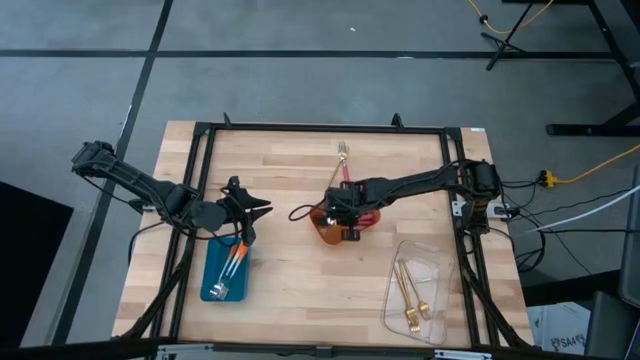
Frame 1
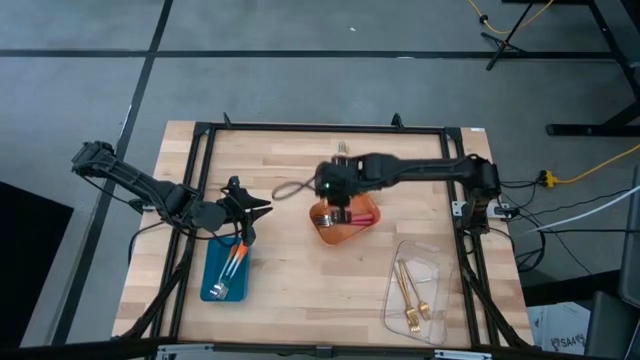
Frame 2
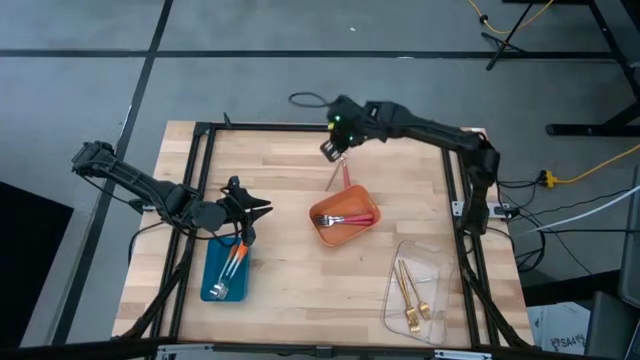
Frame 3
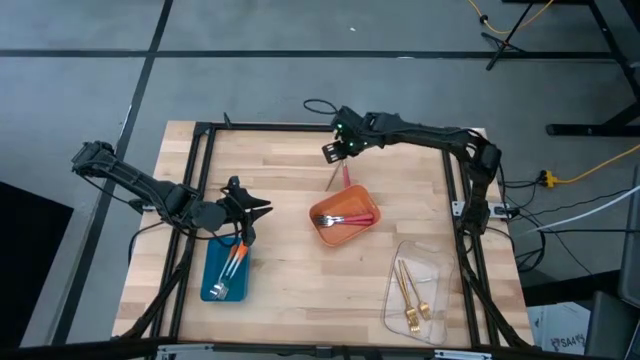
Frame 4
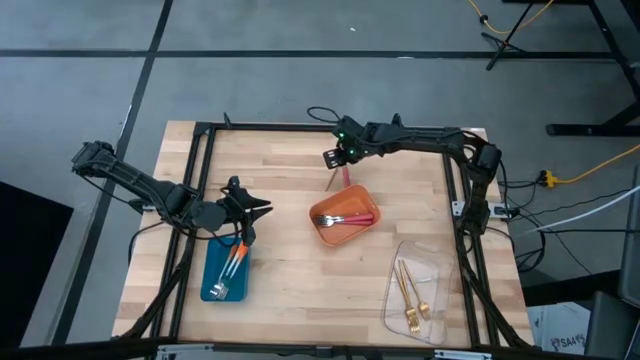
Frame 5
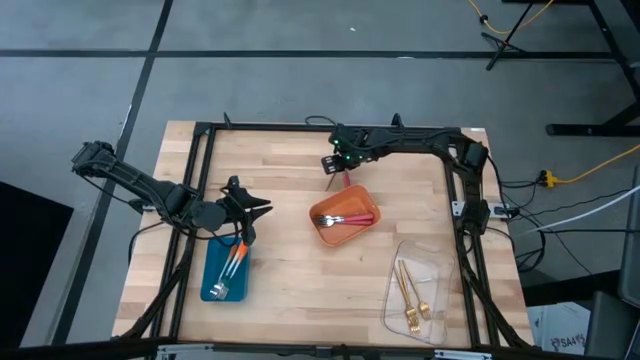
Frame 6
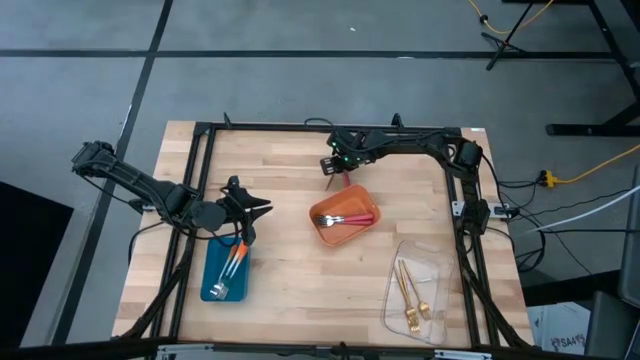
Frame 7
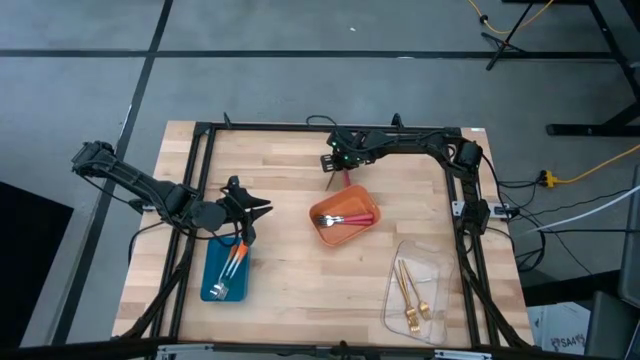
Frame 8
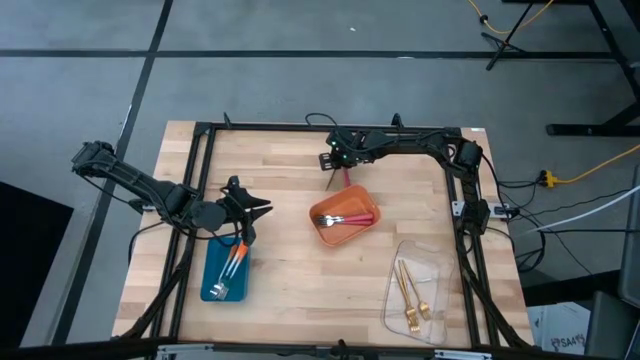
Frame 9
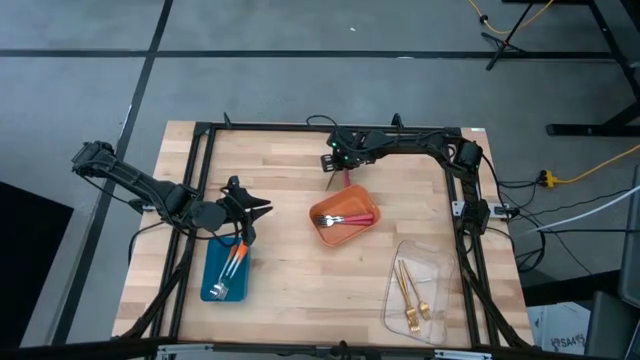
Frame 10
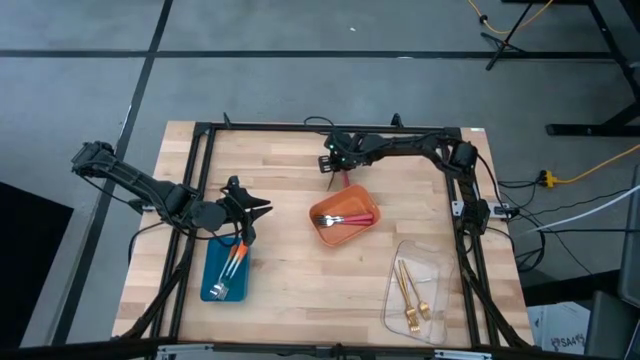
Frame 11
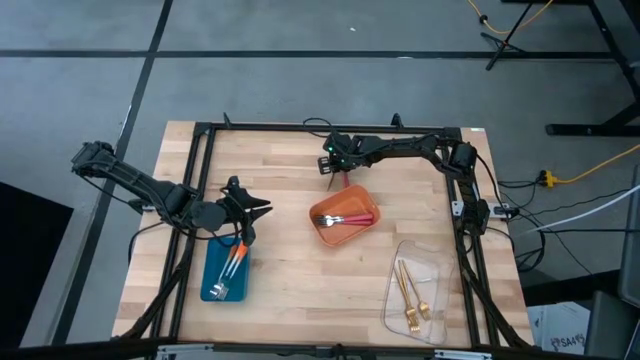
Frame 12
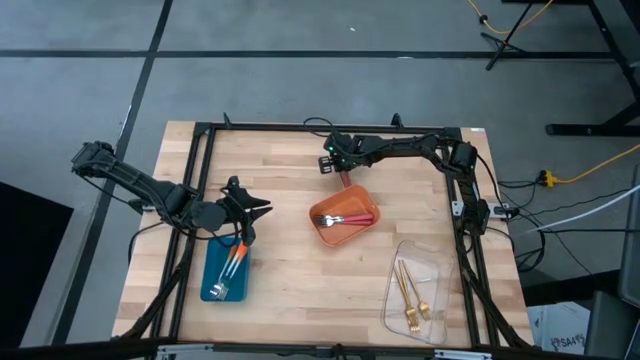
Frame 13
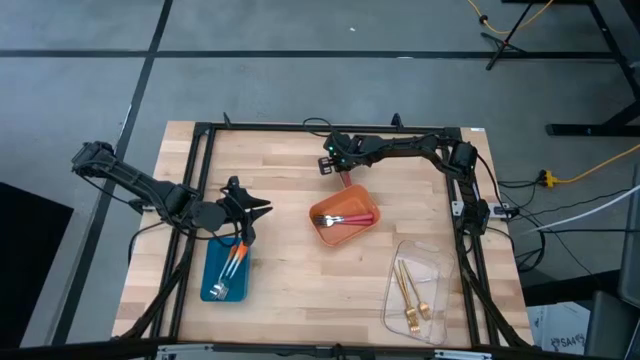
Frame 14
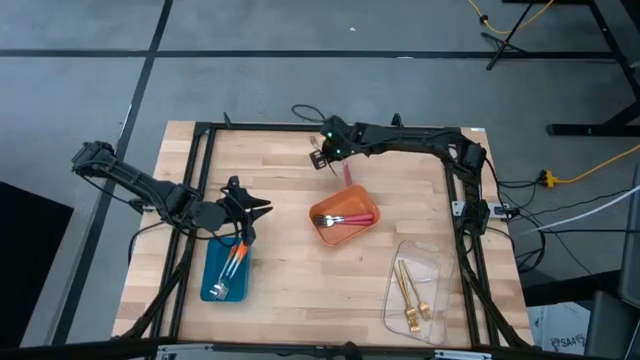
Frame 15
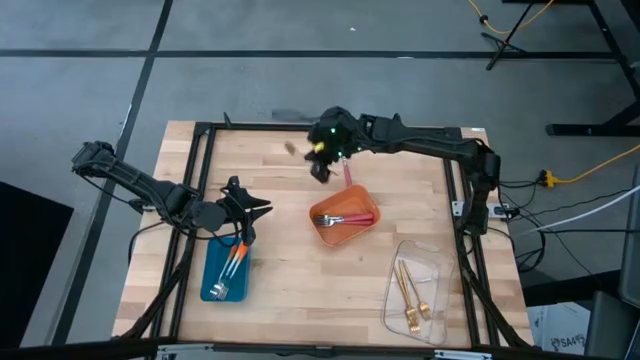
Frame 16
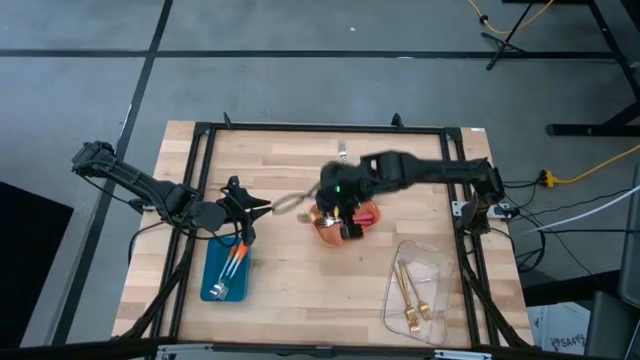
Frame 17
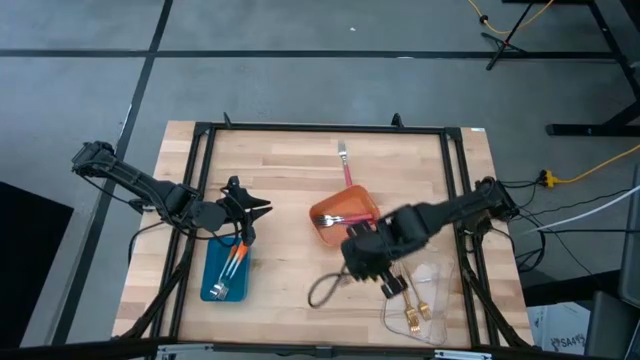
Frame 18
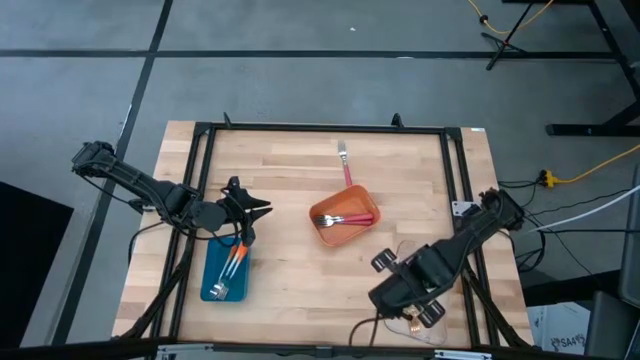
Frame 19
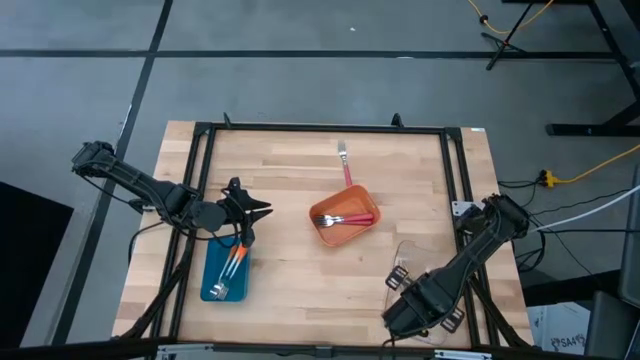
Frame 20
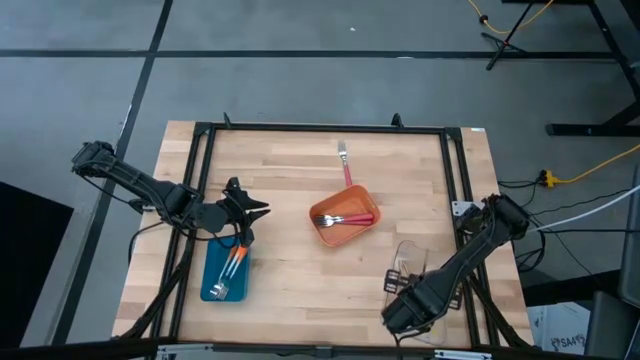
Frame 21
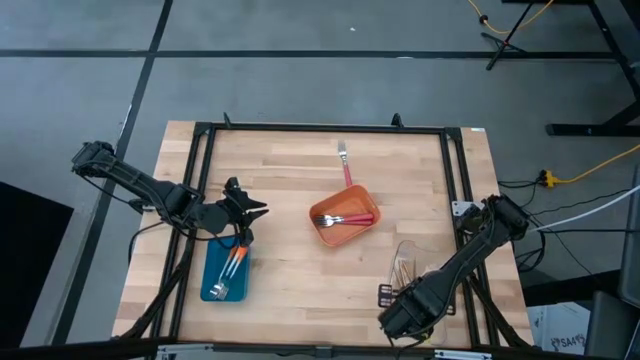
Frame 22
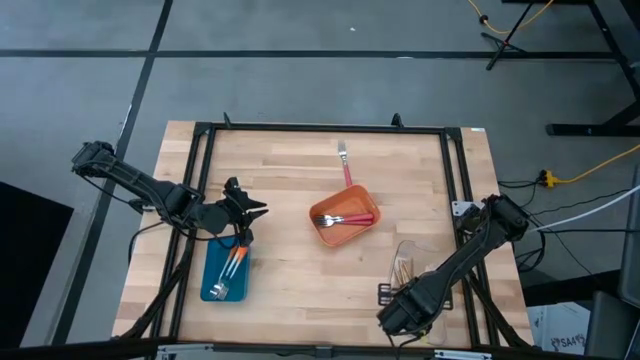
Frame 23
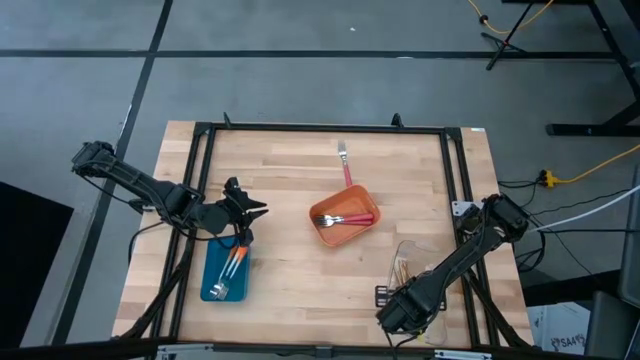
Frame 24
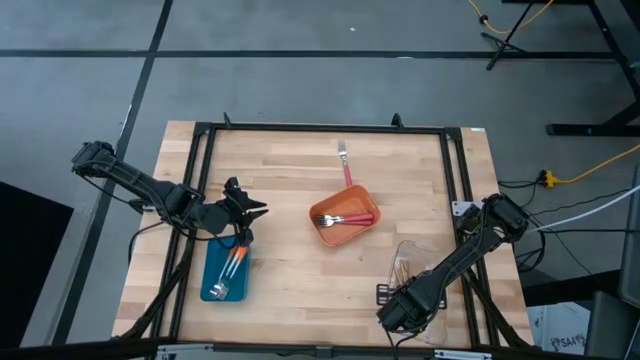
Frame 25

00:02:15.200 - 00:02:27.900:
Task: Sort silverware by color (type)
Put the gold fork into the transparent bin

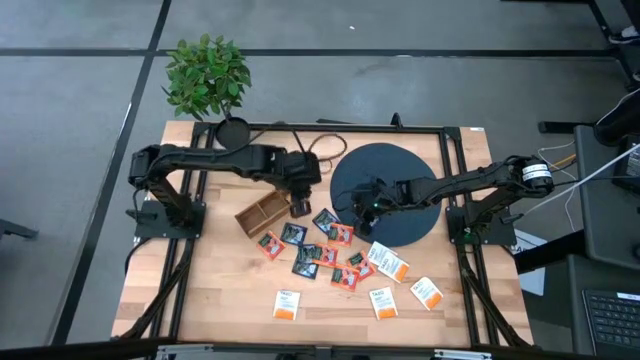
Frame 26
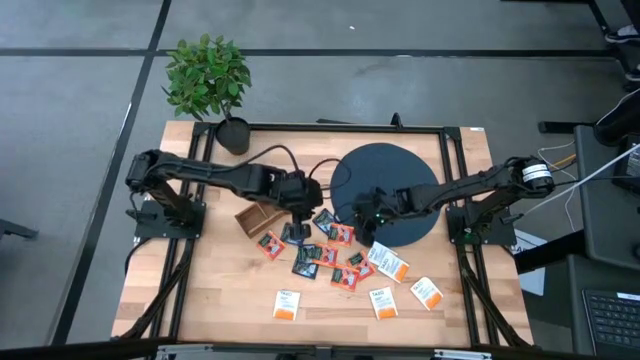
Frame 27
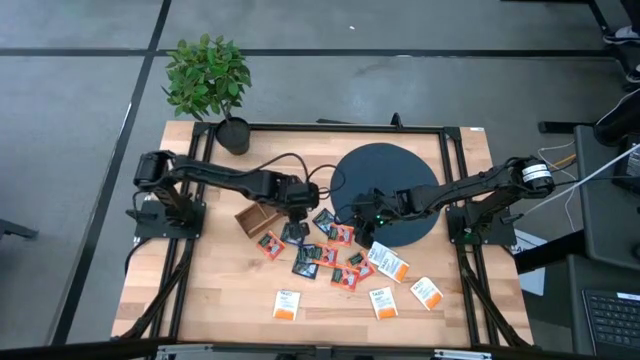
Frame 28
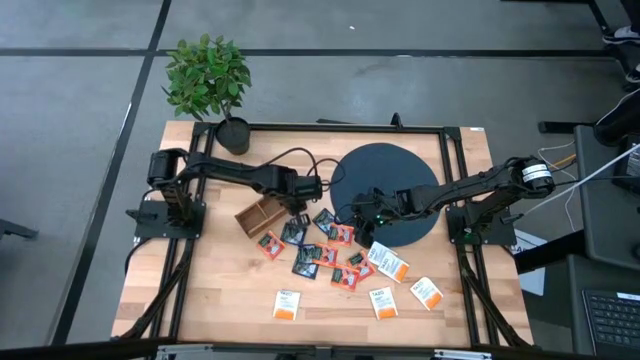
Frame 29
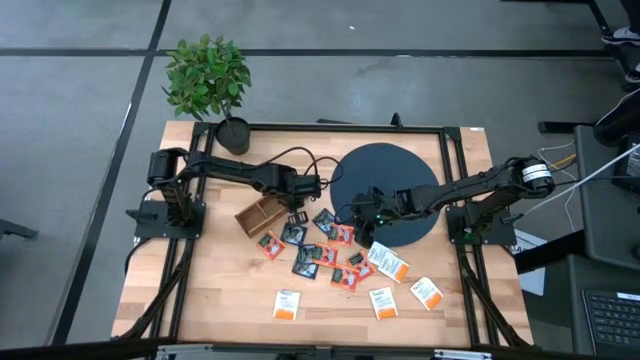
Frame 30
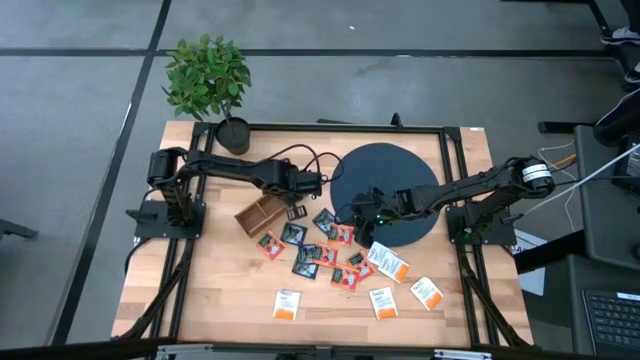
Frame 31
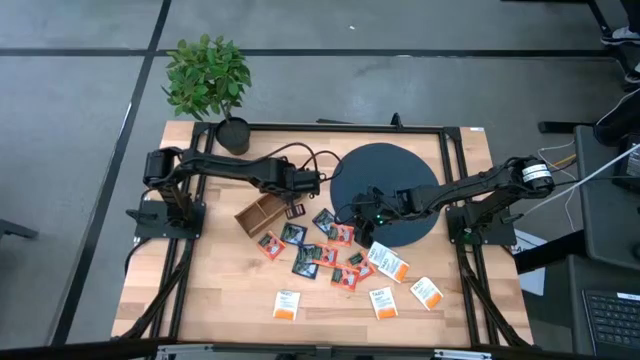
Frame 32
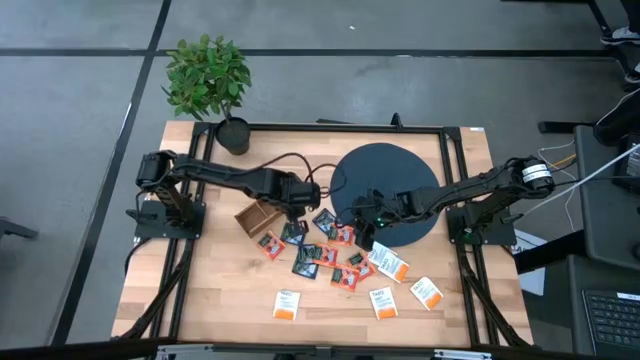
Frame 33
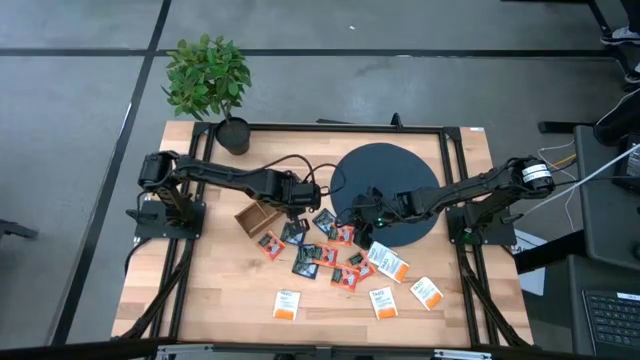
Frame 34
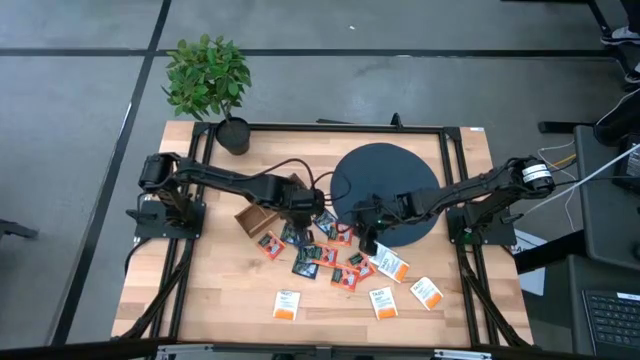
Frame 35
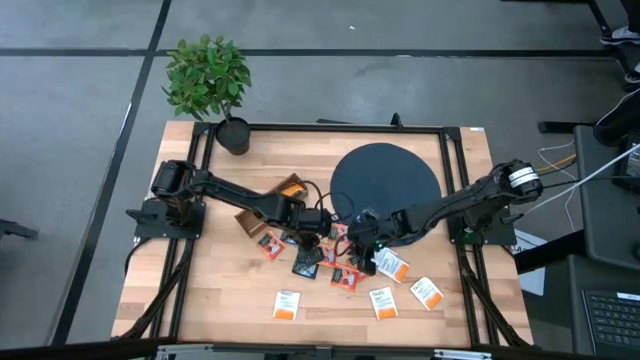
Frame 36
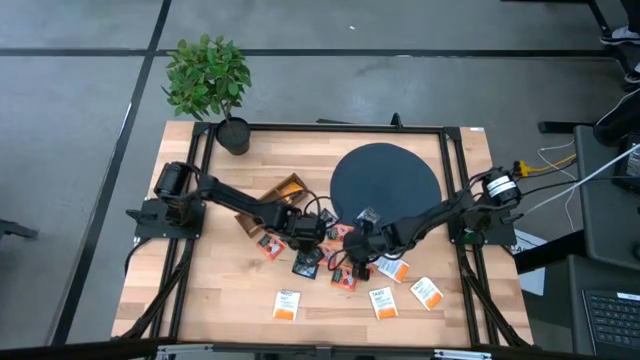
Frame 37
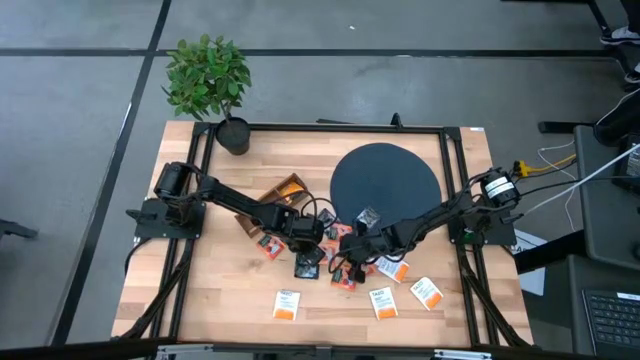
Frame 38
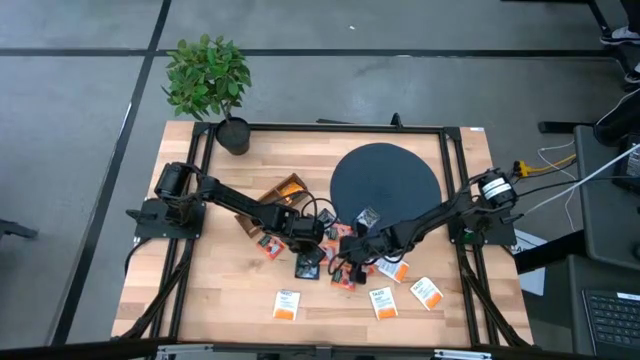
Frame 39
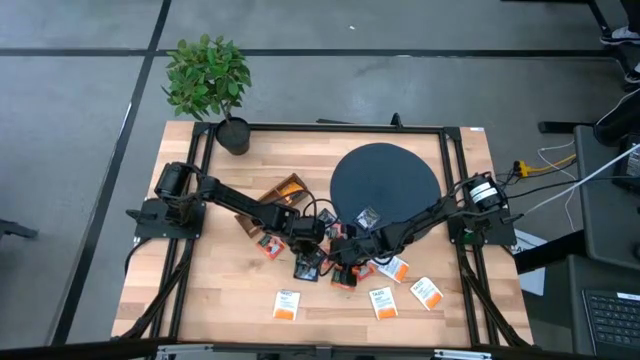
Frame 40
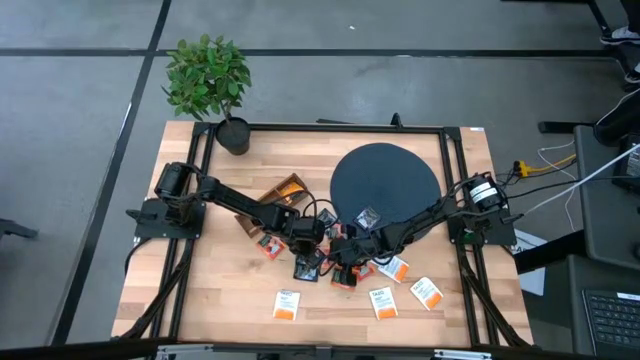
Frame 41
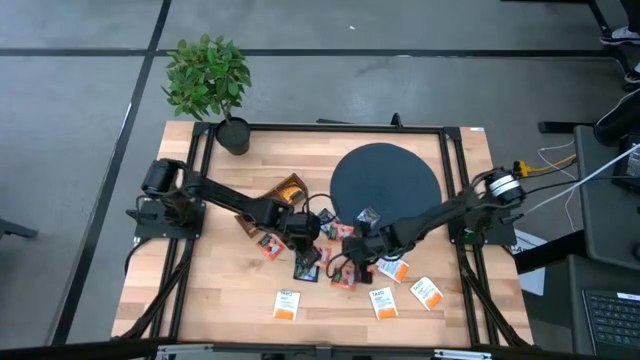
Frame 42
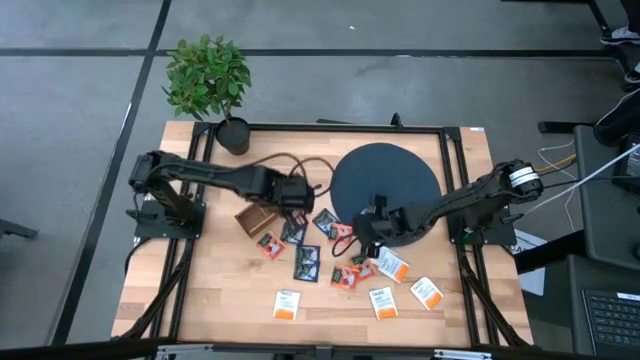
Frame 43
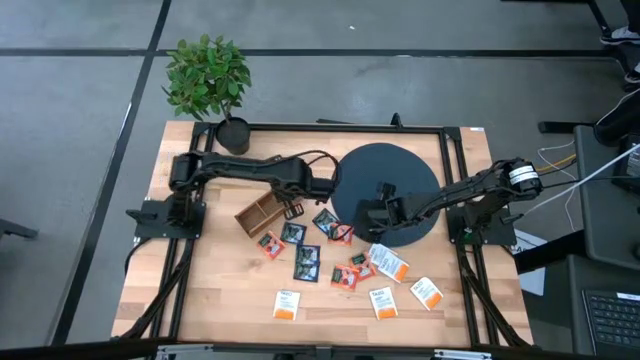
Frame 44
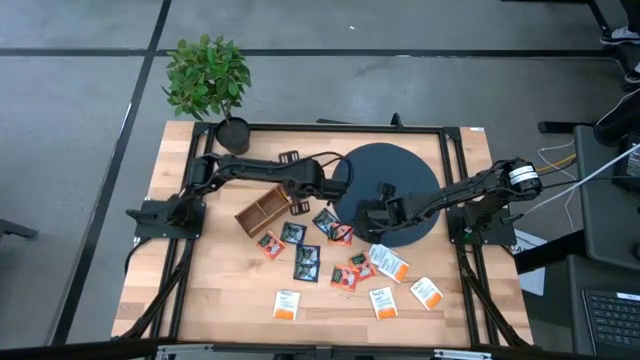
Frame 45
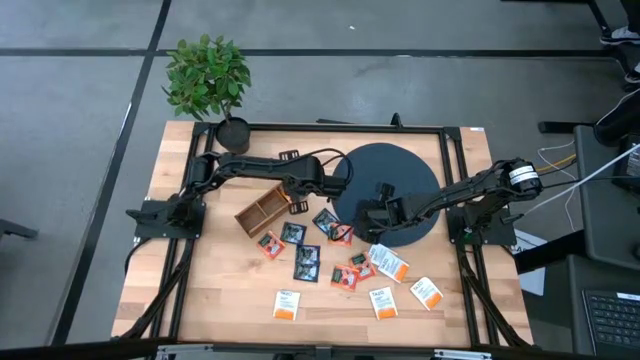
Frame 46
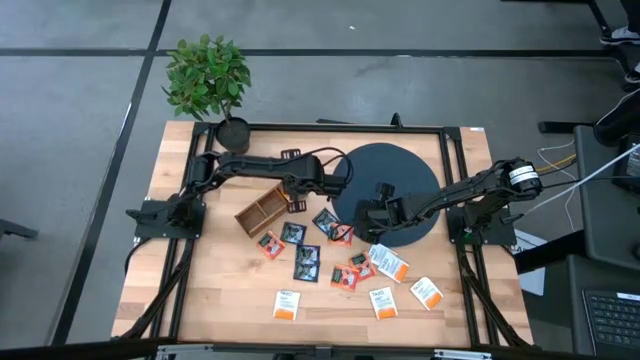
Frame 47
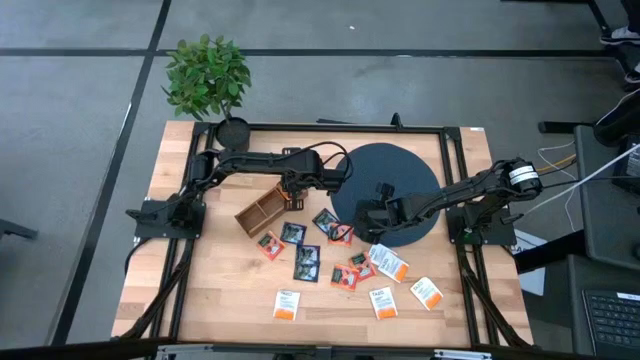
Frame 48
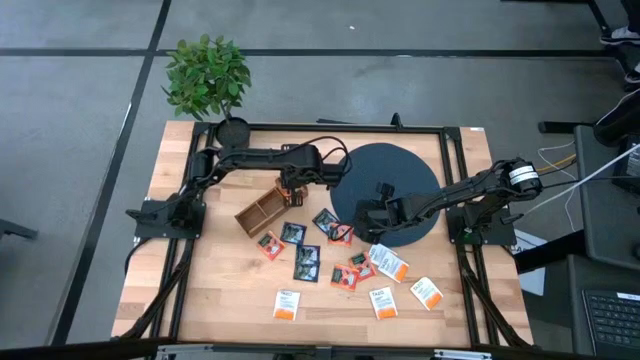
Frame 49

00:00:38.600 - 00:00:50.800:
Task: Pick & Place Tea
Put the orange tea bag into the right section of the wooden organizer
